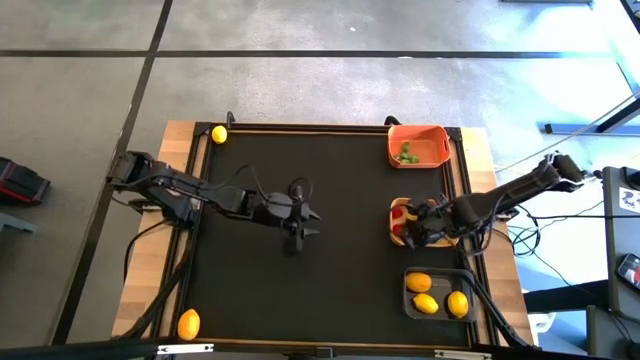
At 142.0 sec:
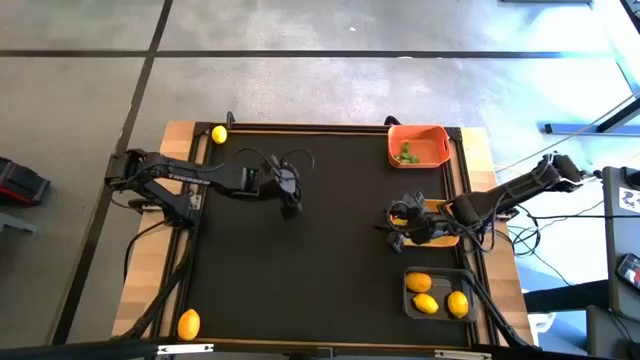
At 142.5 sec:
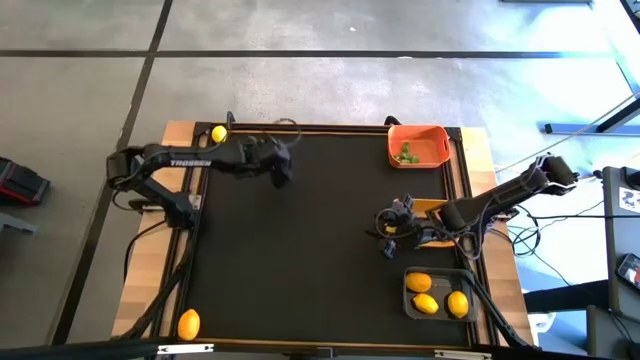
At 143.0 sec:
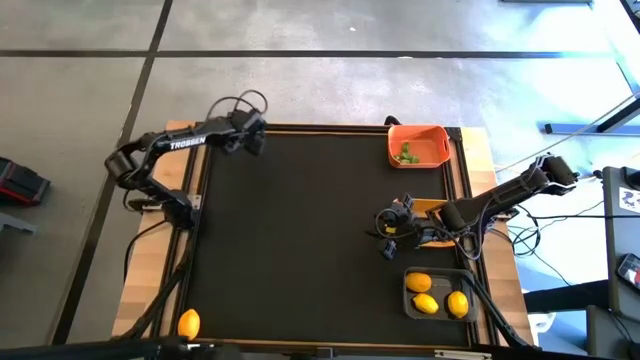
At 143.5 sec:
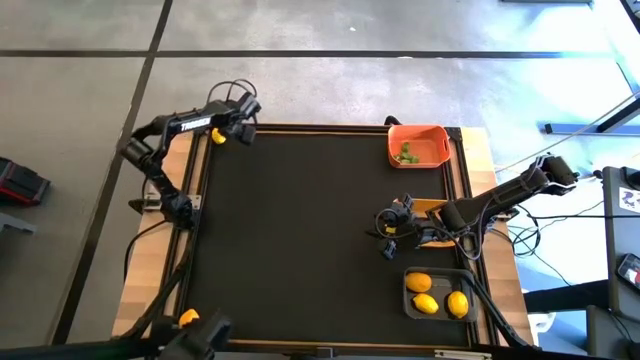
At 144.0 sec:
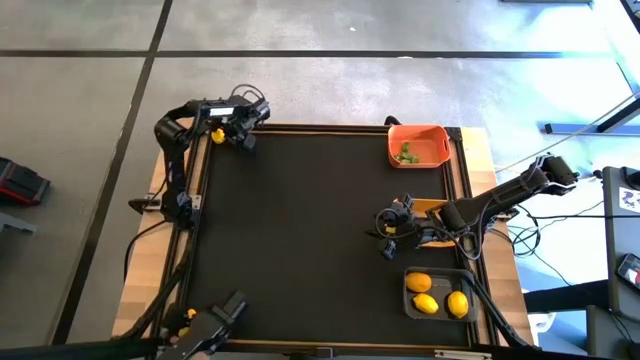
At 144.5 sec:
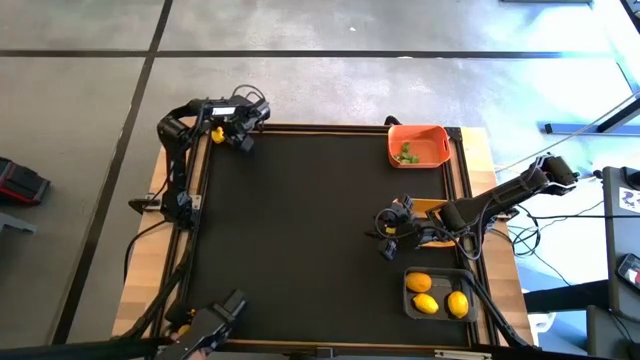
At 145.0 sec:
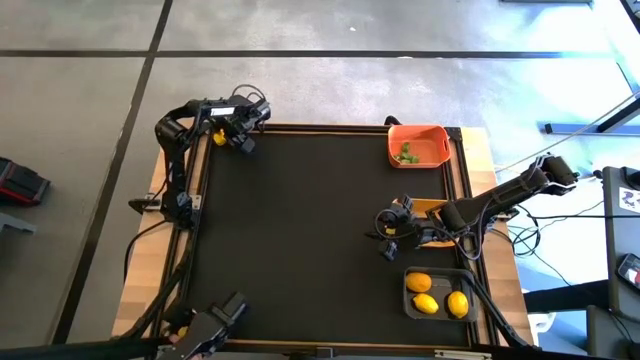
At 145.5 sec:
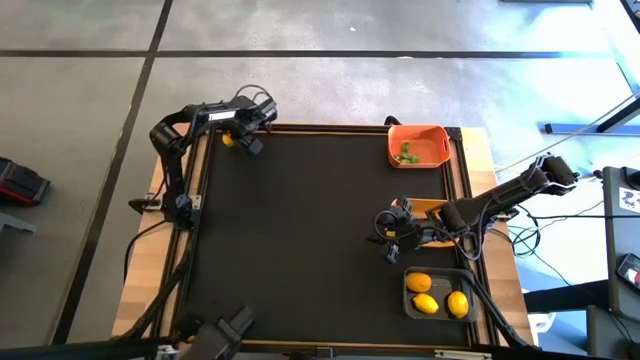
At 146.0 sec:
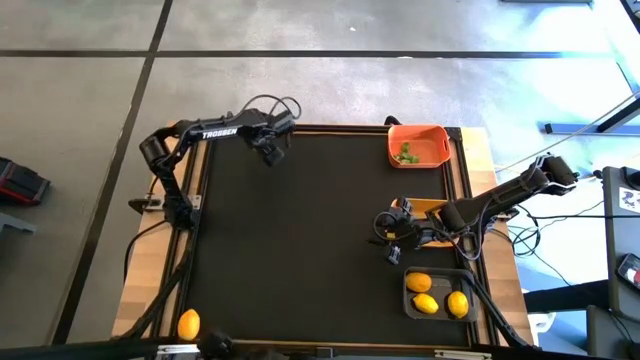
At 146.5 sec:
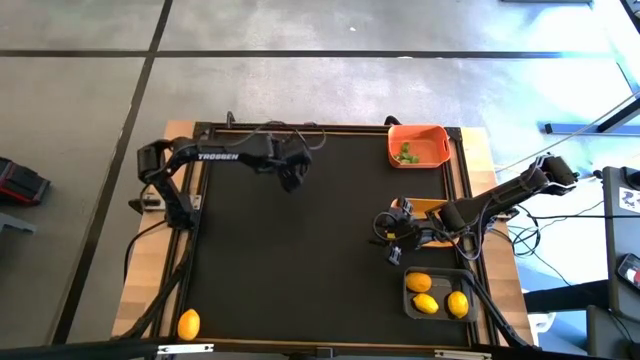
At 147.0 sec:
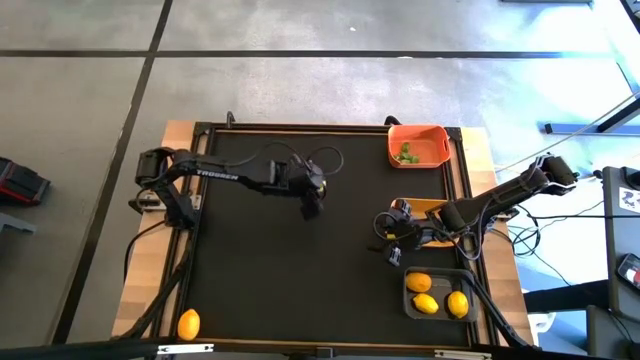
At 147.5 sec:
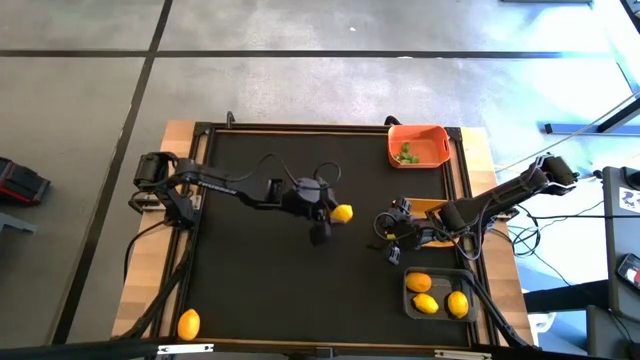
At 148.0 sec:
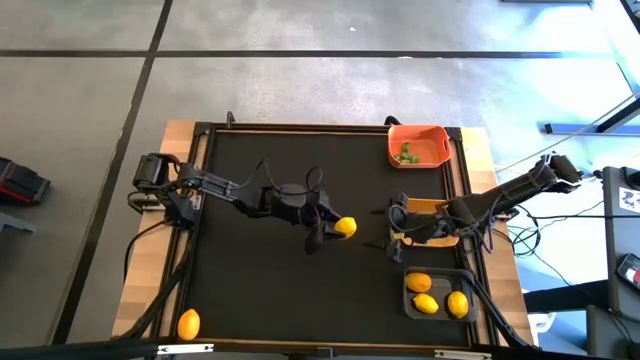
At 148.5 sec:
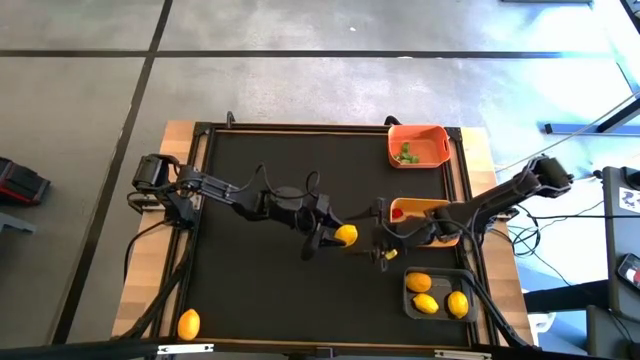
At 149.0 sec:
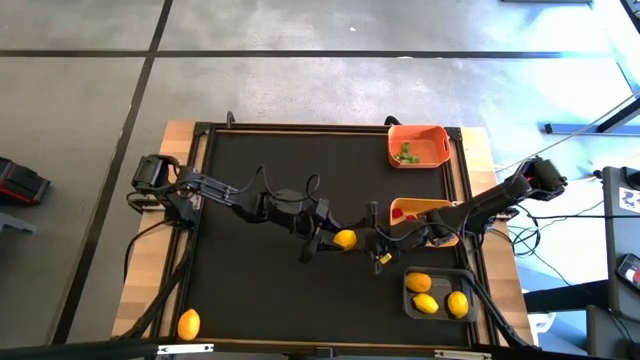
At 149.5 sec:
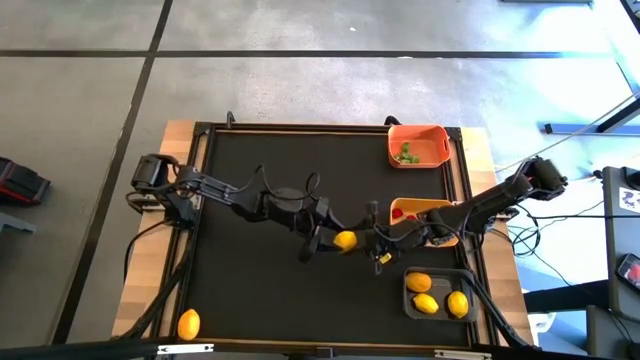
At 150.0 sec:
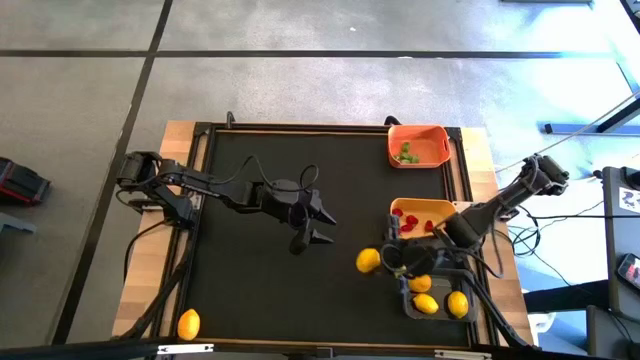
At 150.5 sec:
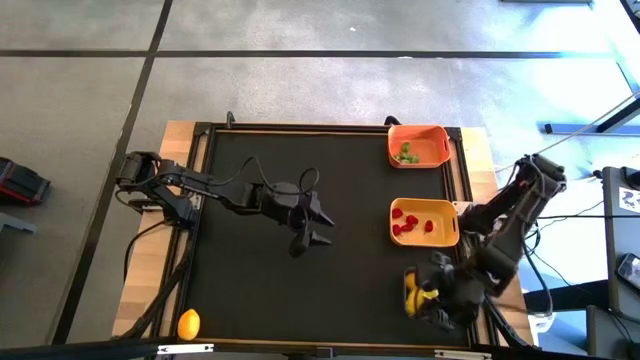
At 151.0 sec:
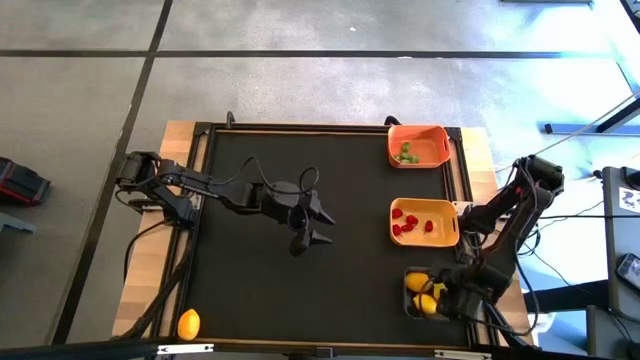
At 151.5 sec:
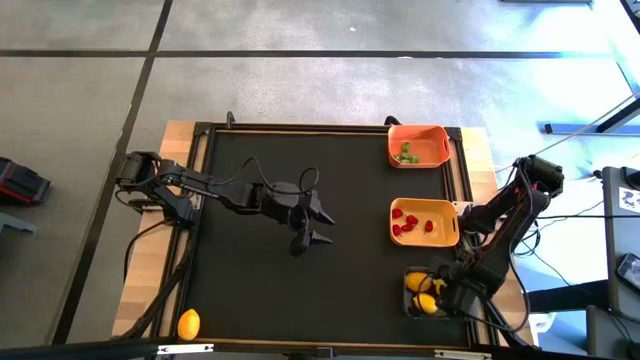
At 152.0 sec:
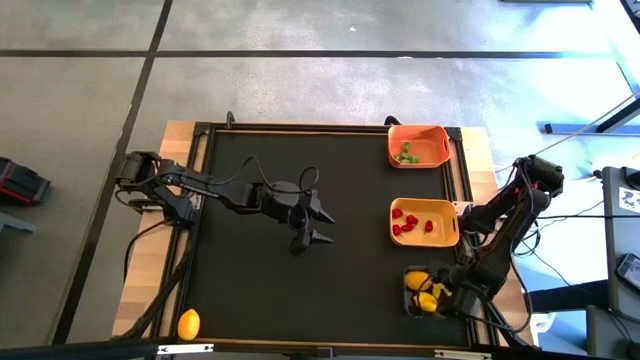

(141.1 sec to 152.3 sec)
Task: Sort produce into baskets
Put the top yellow lemon into the black bin

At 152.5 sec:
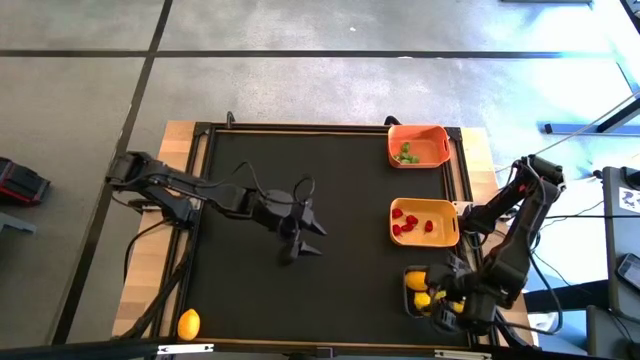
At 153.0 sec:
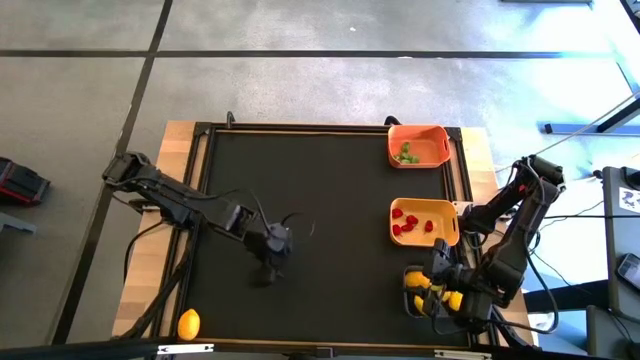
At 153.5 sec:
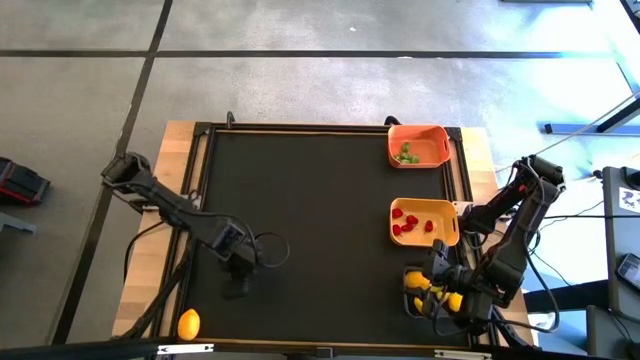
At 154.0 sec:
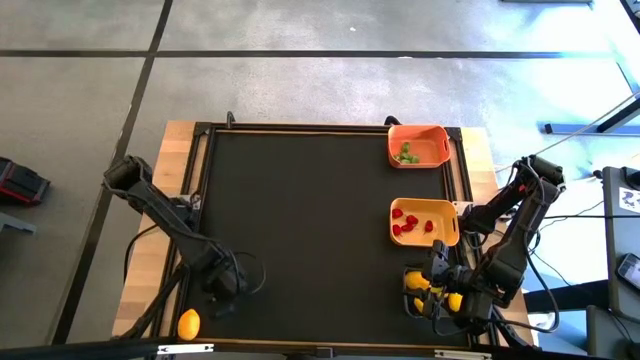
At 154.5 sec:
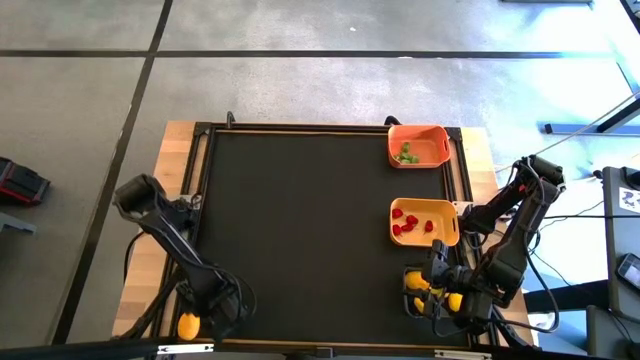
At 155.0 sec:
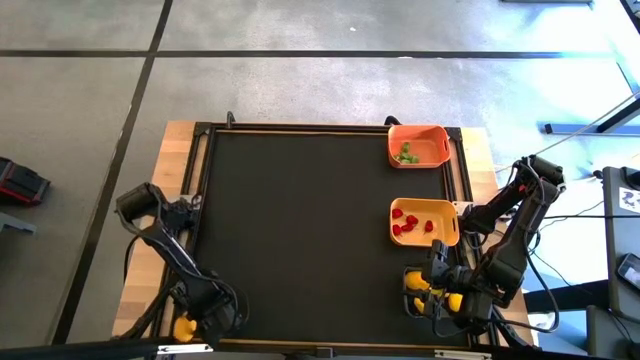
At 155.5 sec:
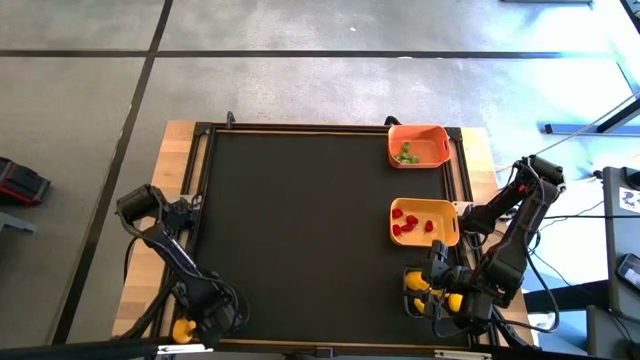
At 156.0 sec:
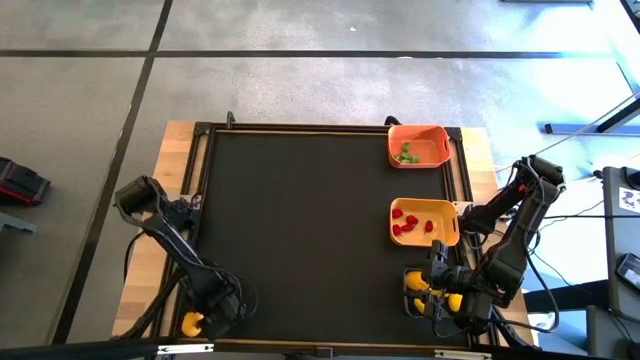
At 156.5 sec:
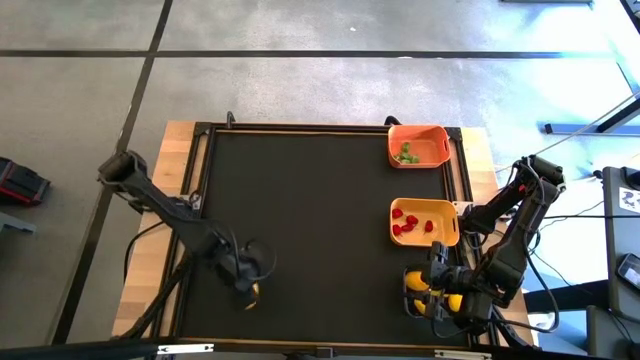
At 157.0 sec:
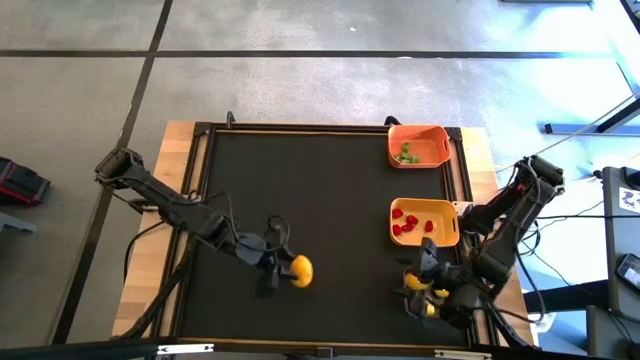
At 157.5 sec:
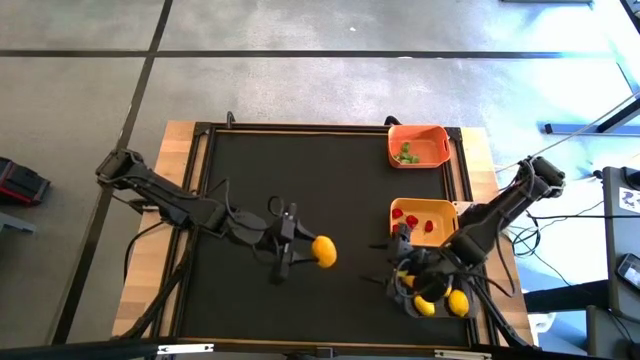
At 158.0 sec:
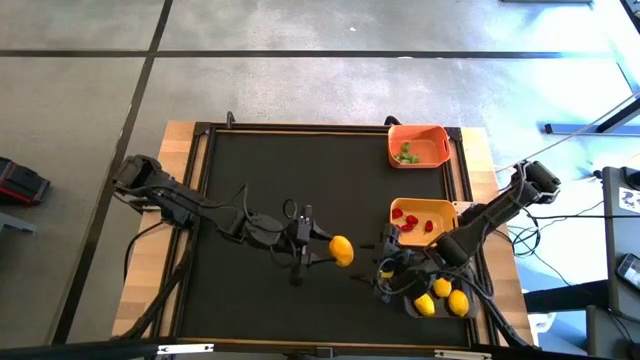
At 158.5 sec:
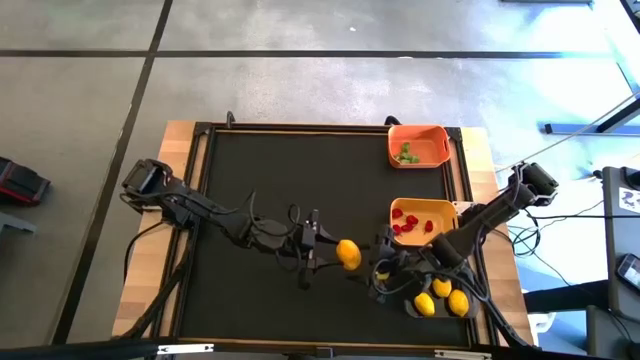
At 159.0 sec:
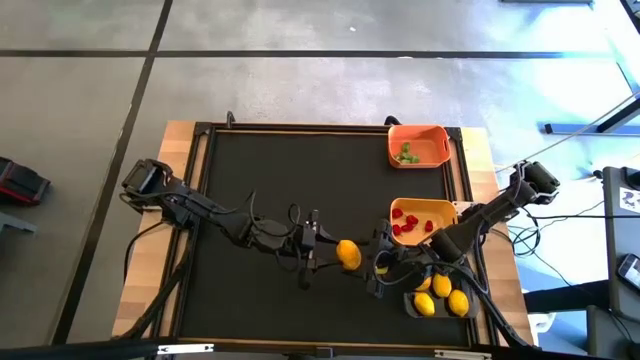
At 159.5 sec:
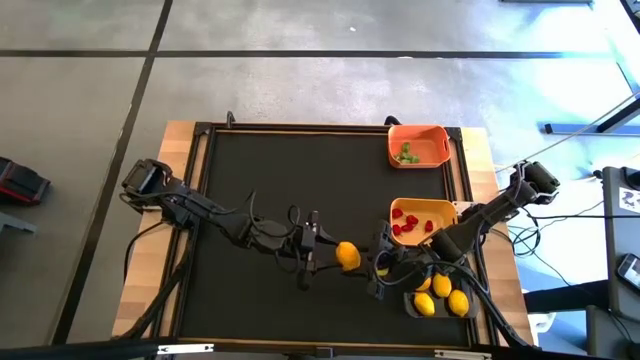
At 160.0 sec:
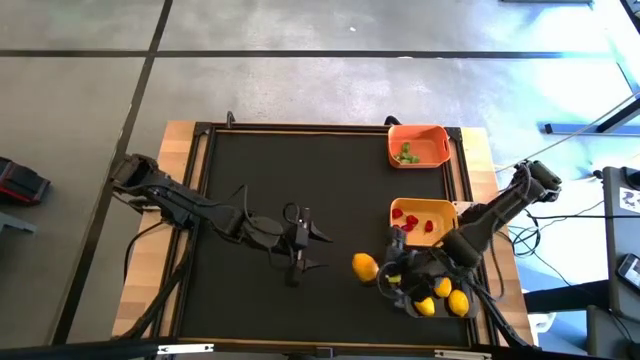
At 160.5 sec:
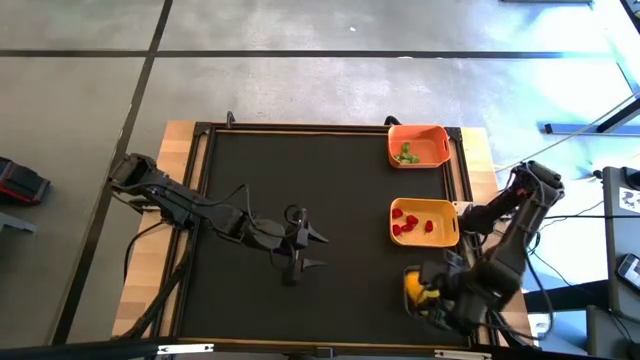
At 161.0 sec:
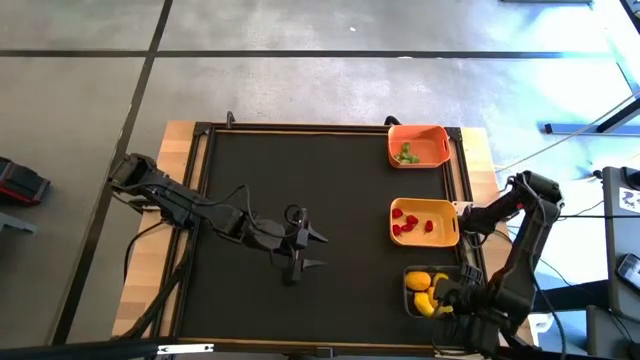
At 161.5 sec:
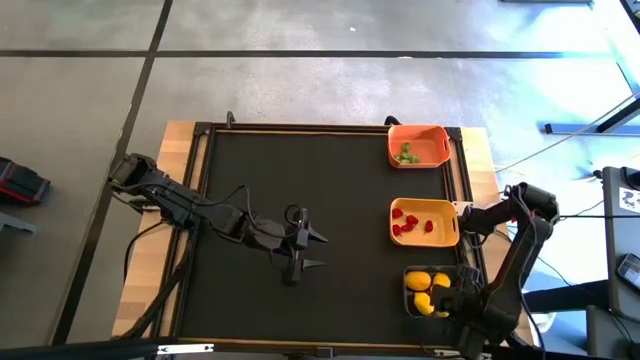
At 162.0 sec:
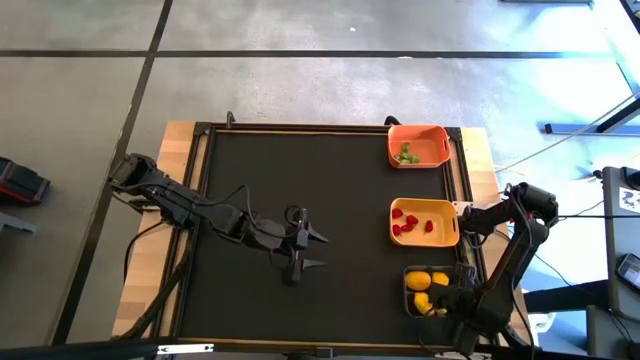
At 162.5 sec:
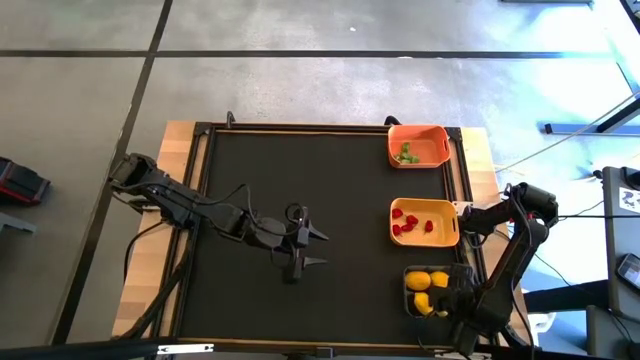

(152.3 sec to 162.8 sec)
Put the yellow lemon into the black bin
